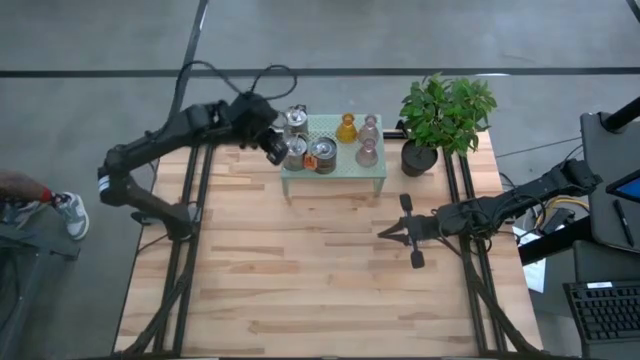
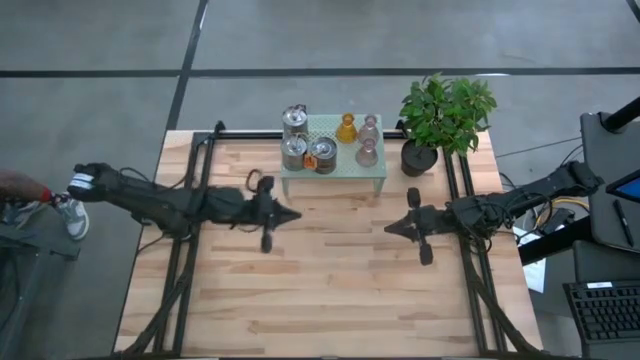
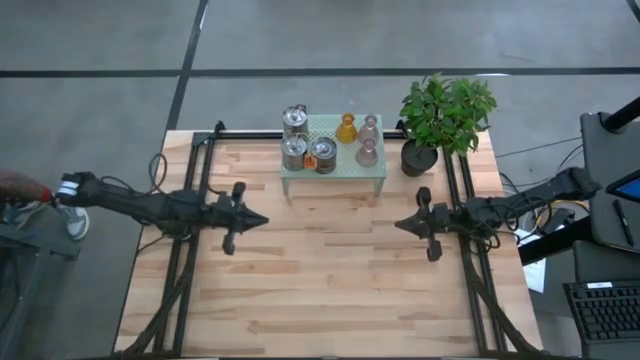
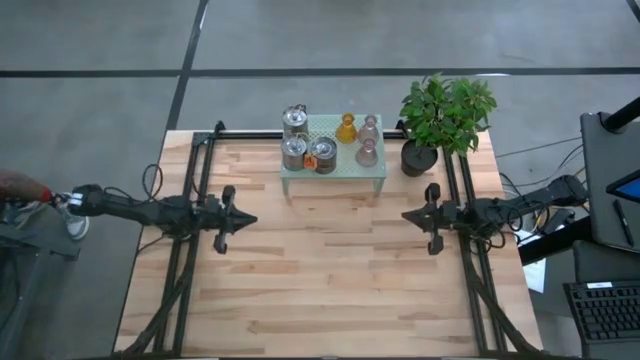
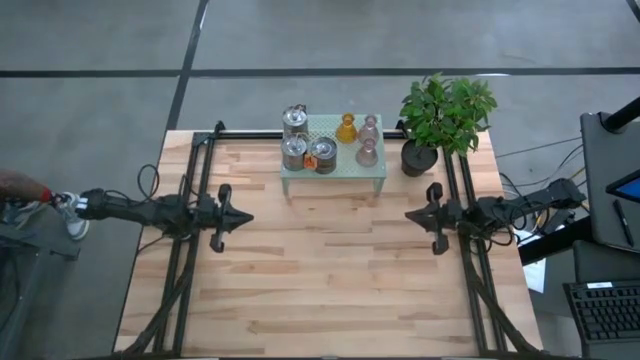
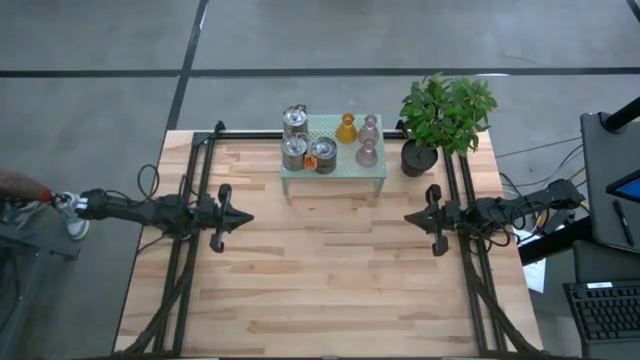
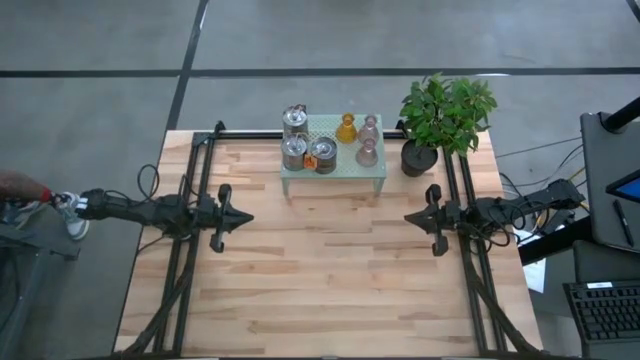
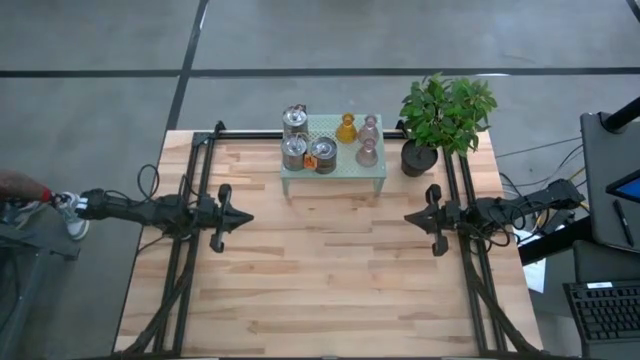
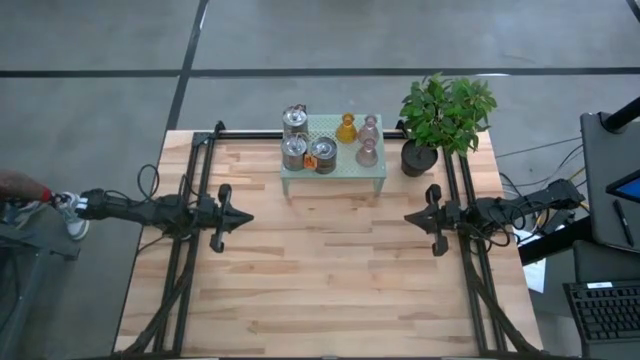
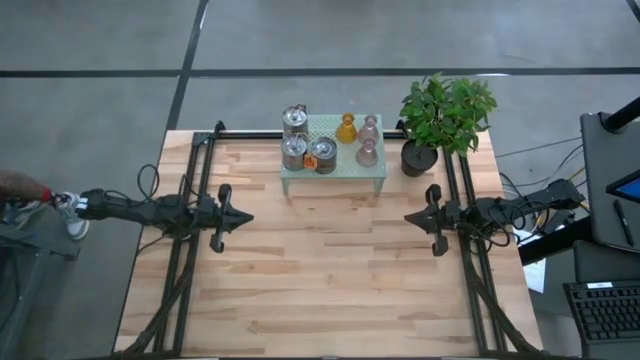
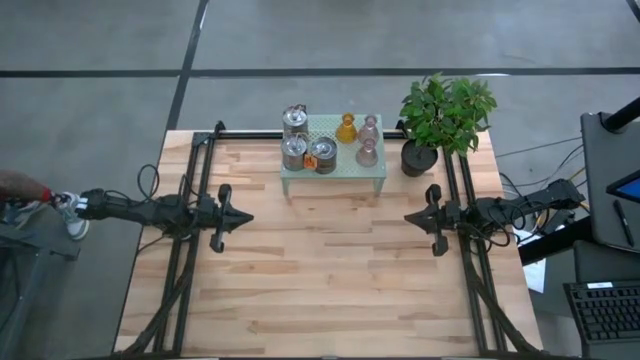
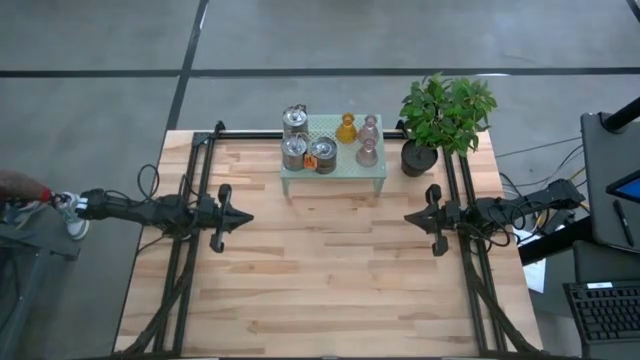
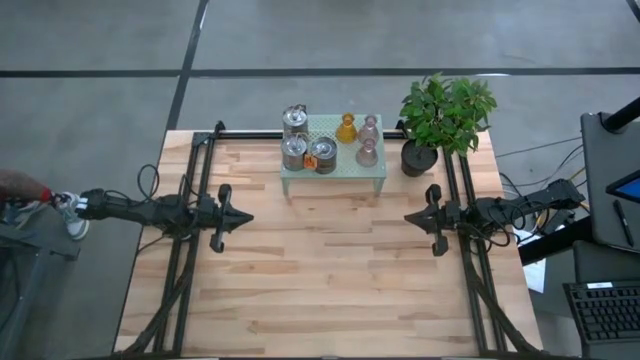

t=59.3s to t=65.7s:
Task: Pick & Place candle stick holders
Return to Home Position

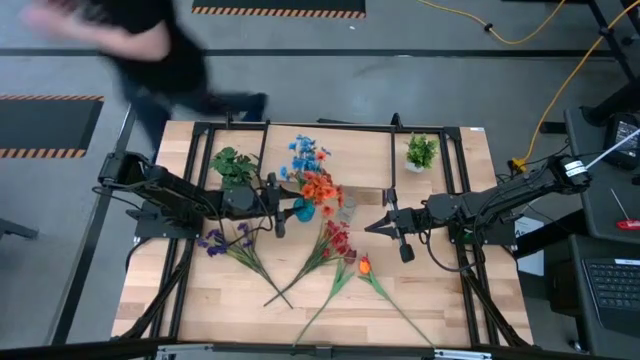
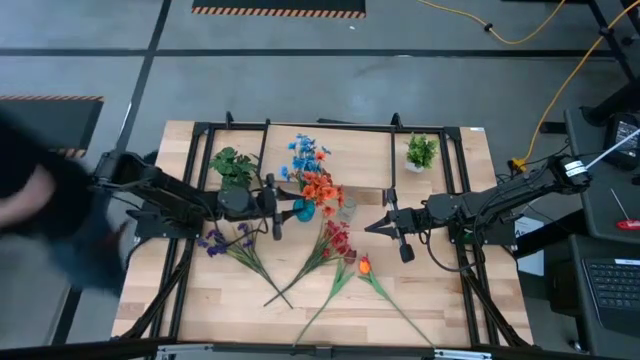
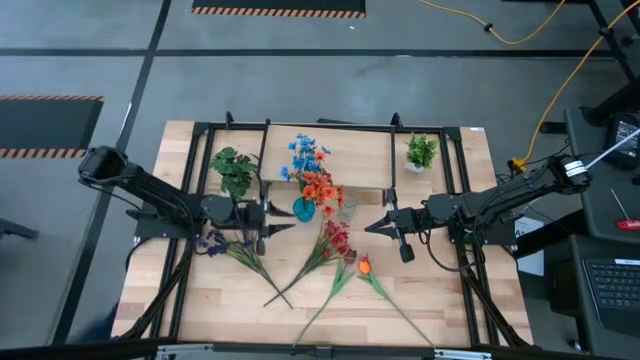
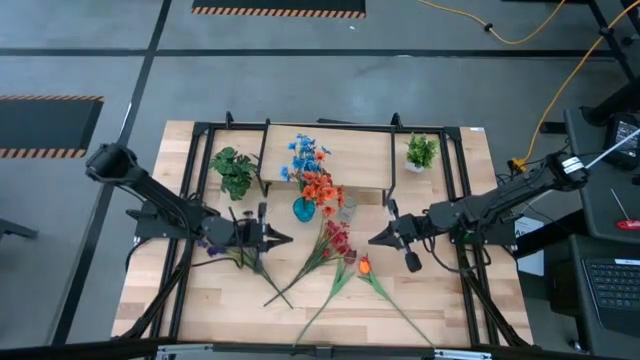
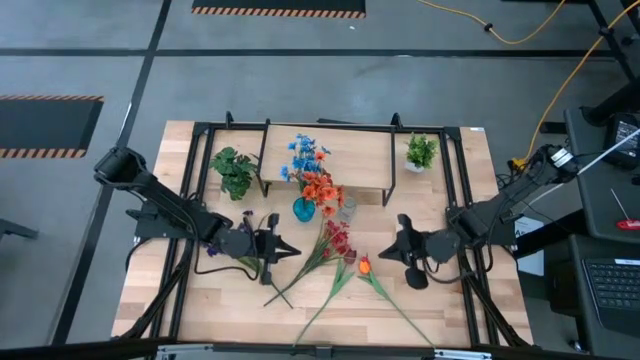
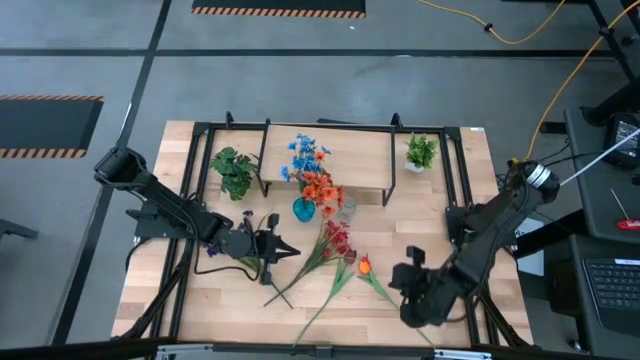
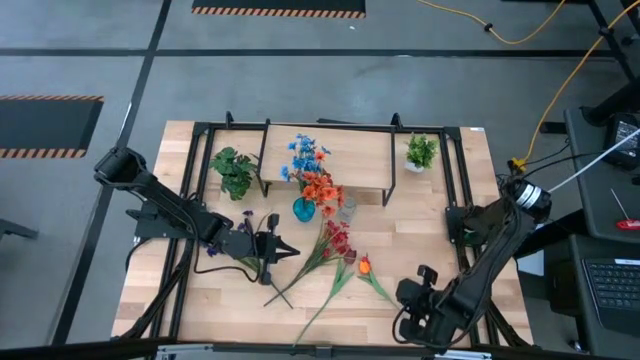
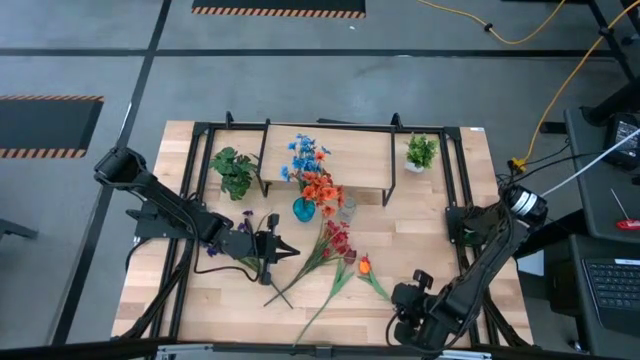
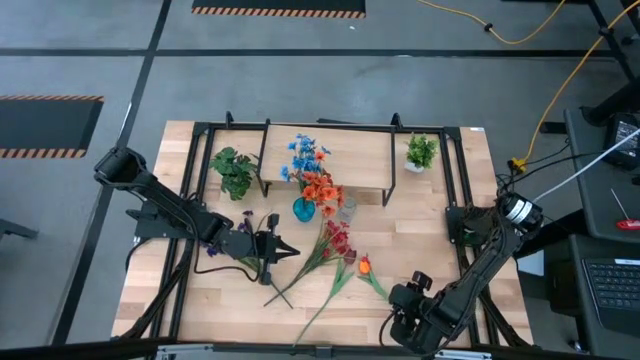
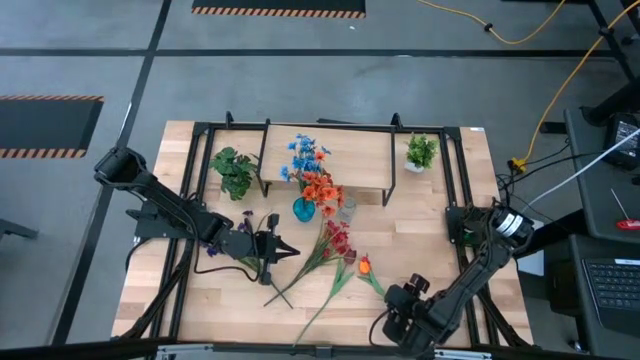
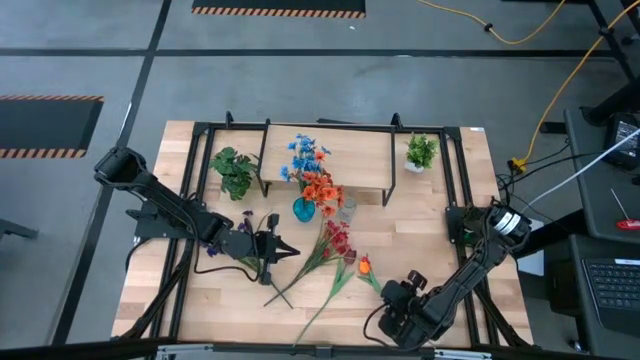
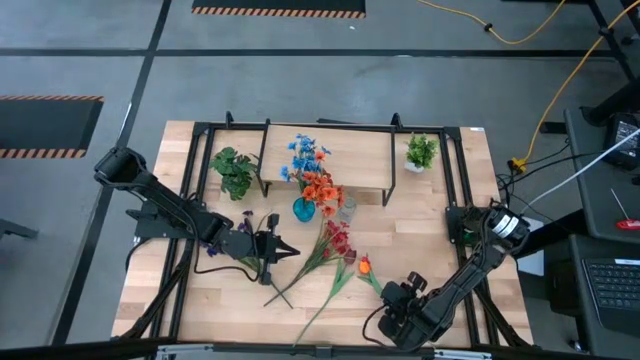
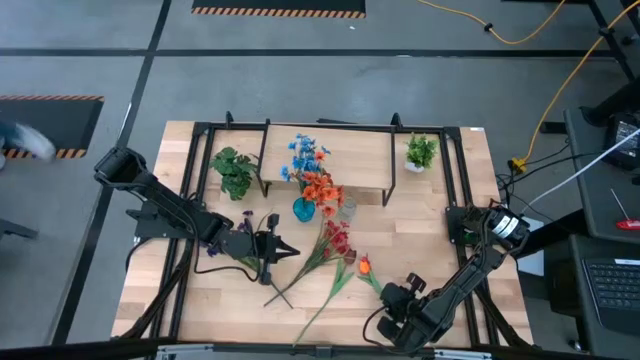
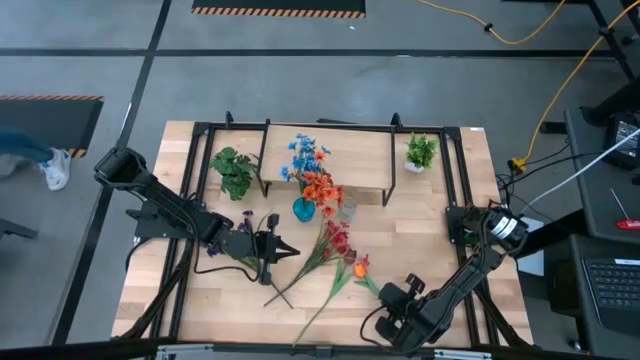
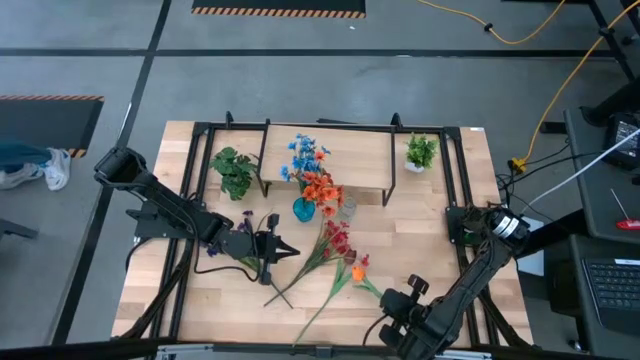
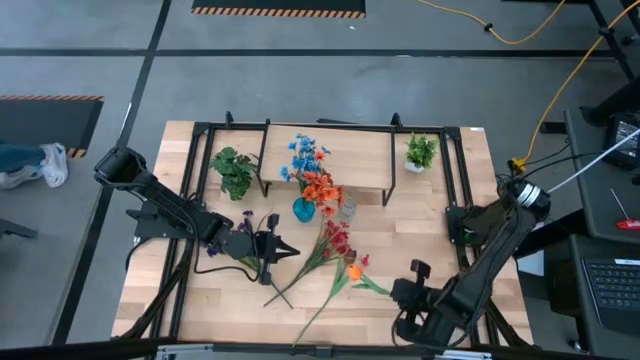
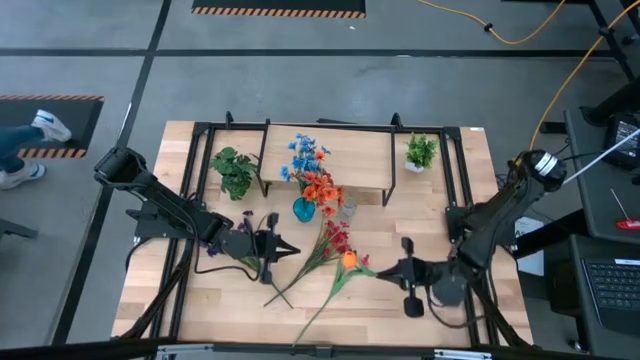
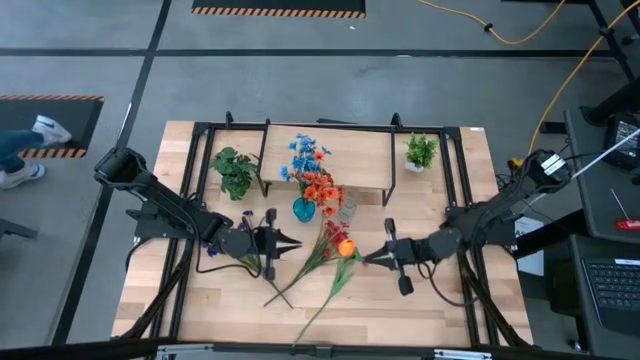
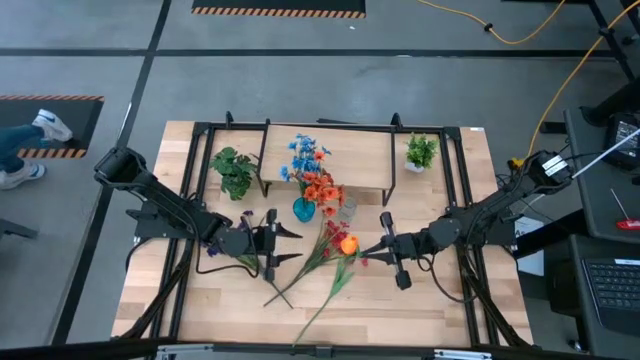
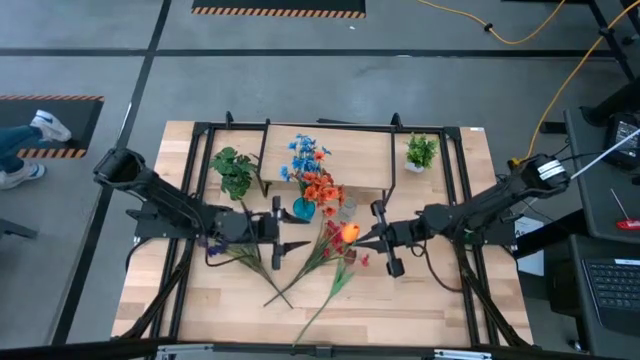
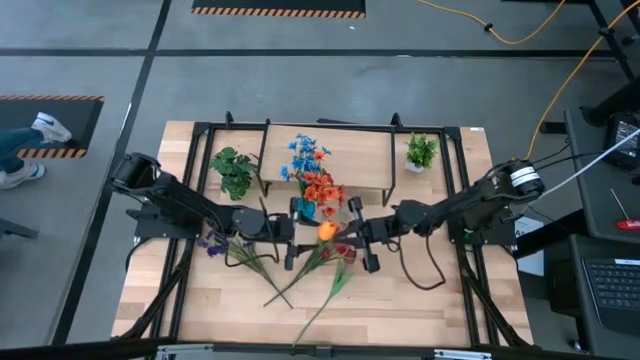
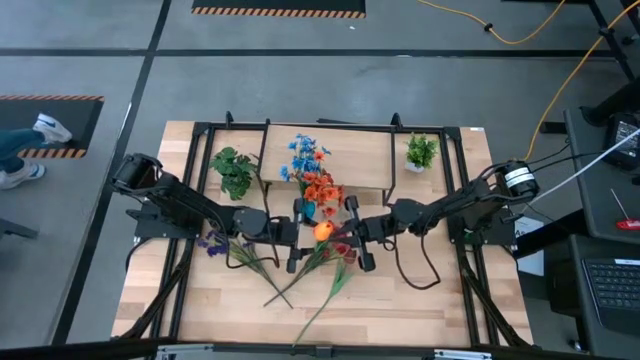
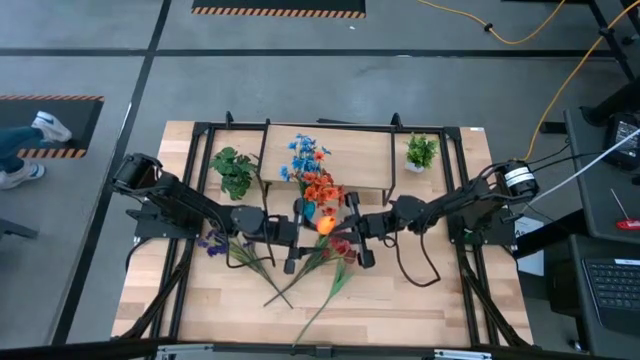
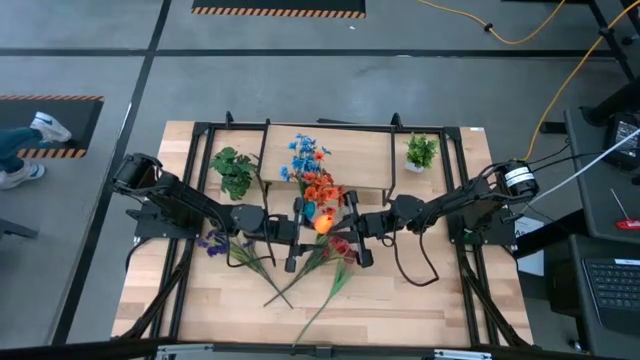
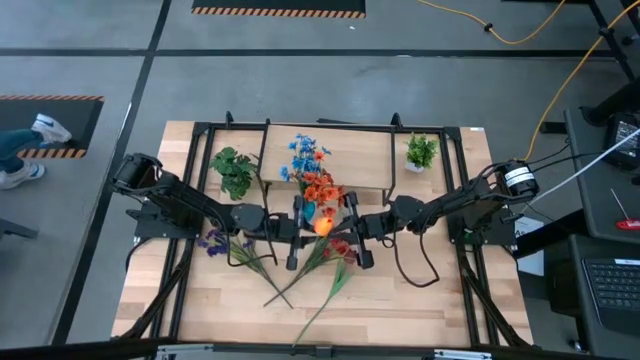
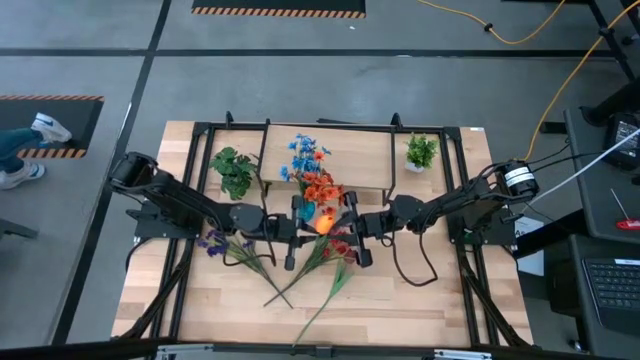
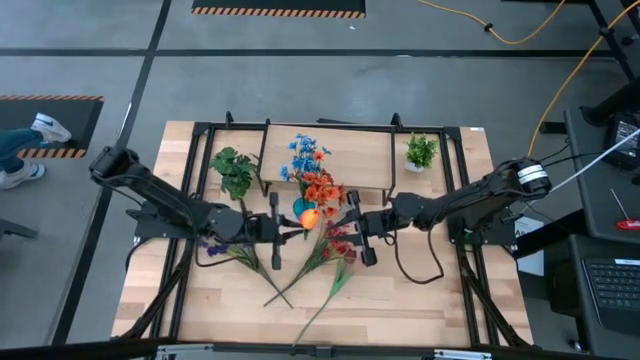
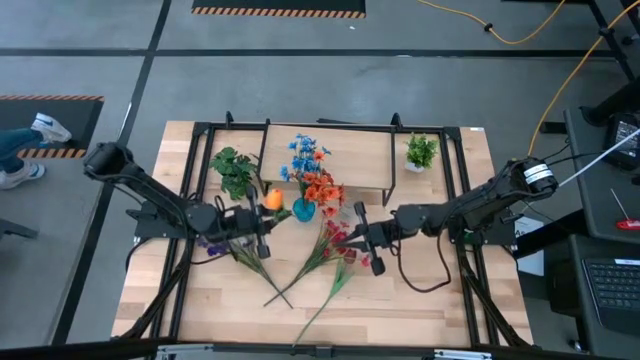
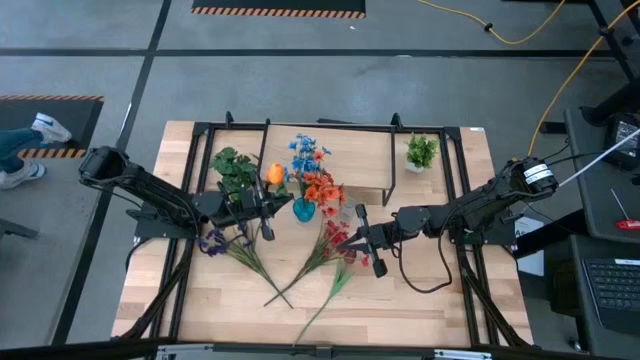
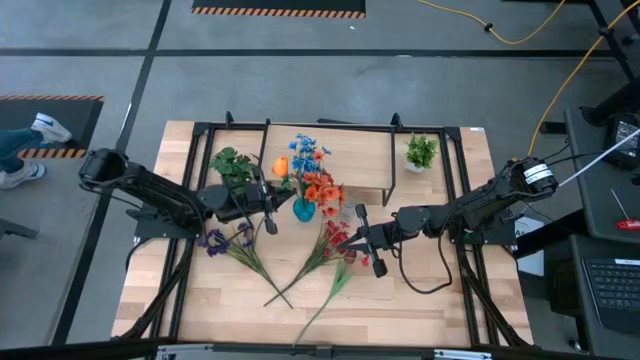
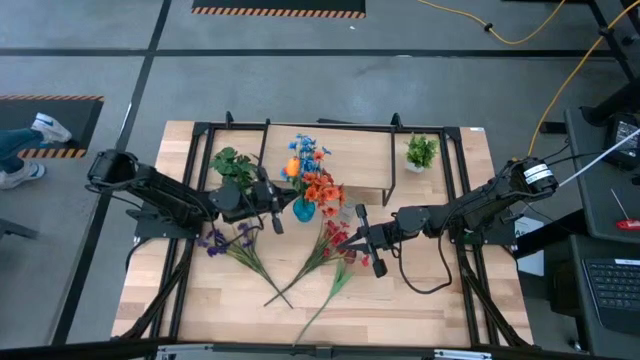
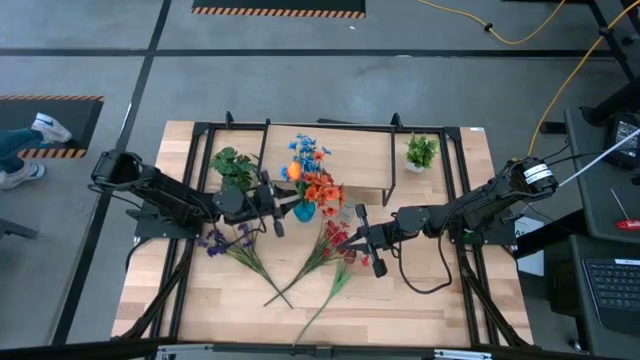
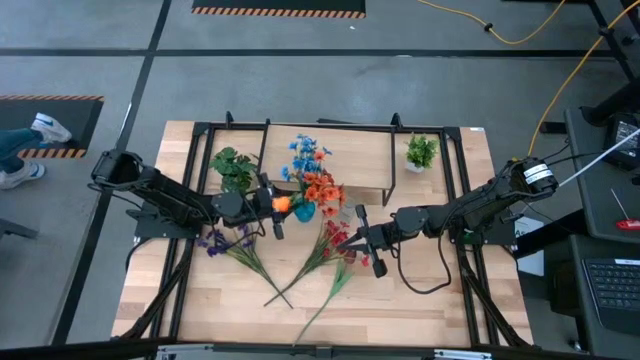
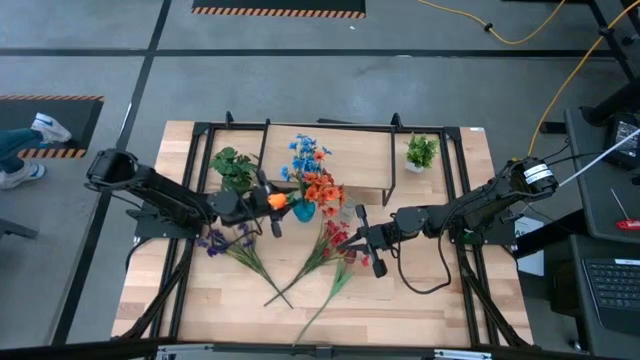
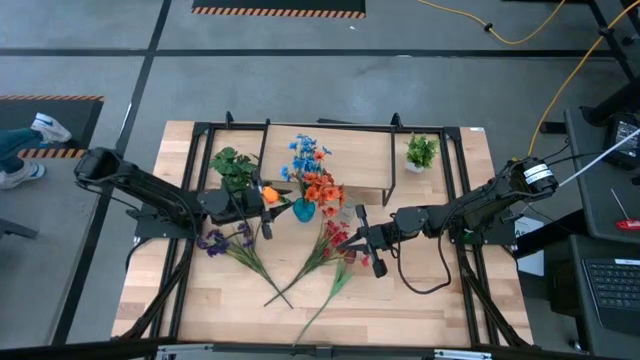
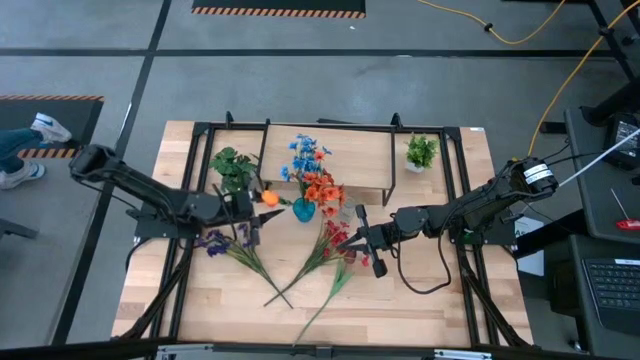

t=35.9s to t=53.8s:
Task: Pick and place flowers into a vace then onto a shelf
Put the orange flower into the blue vase
